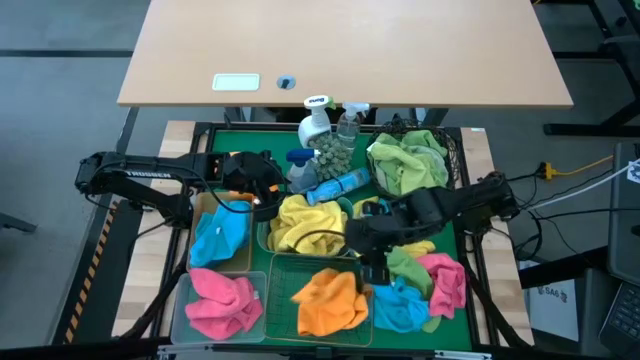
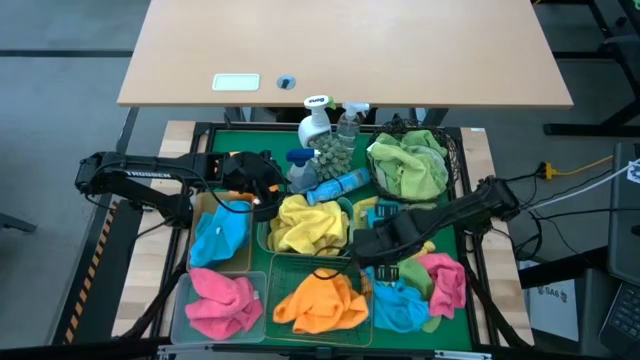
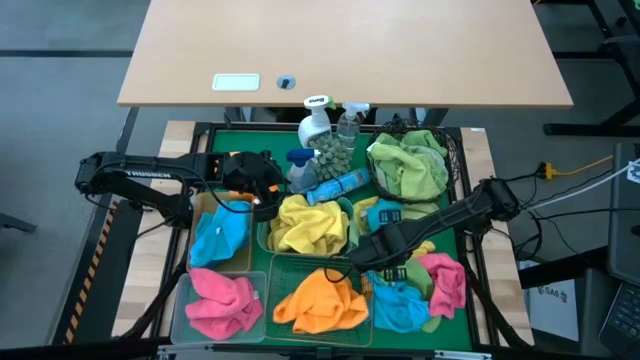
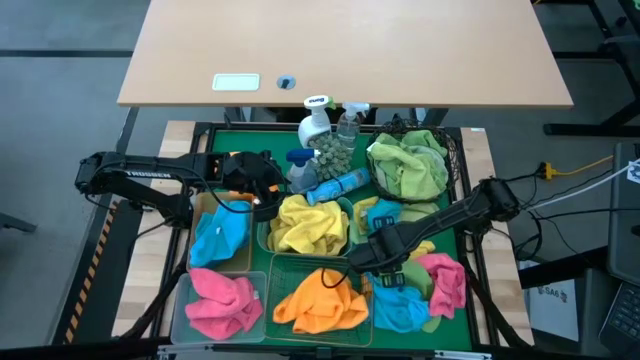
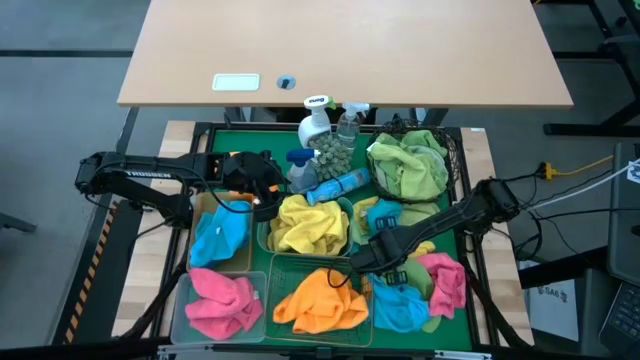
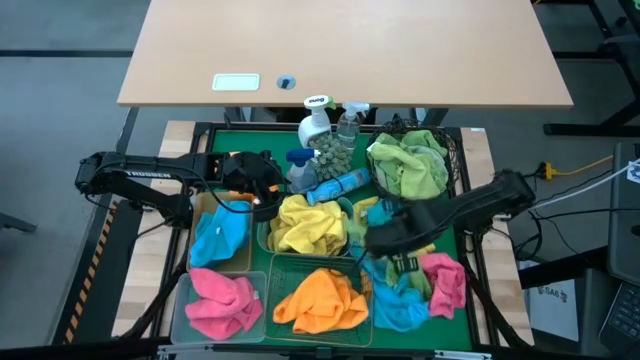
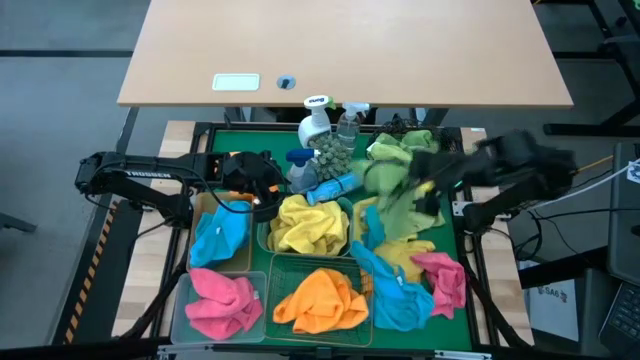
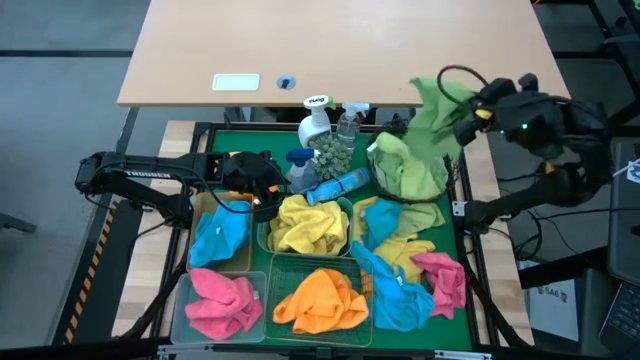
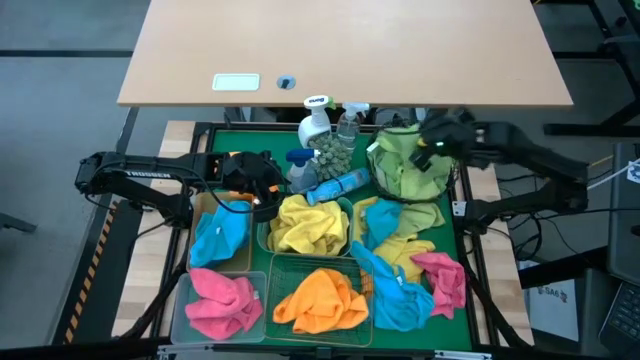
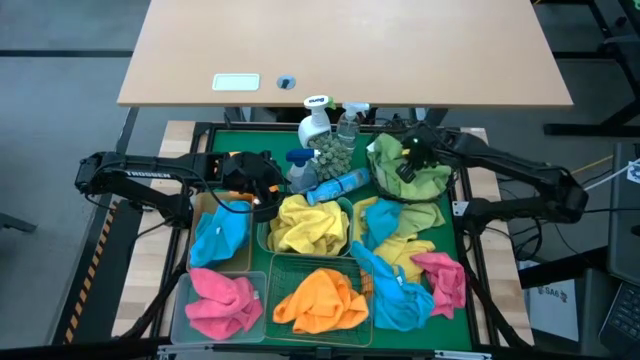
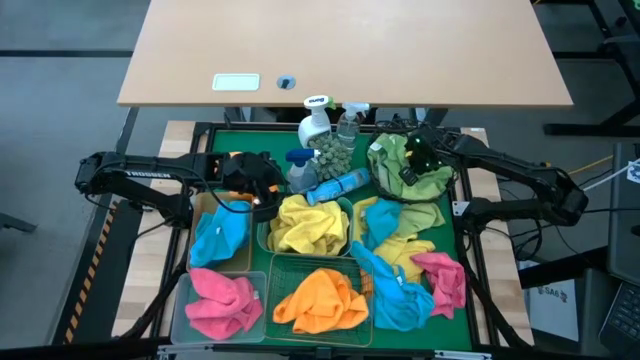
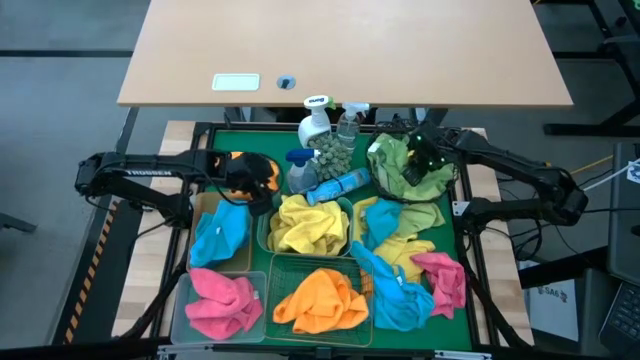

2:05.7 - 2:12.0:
Task: Sort microfiber towel by color & place in baskets
Put the green microfiber towel into the black wire basket

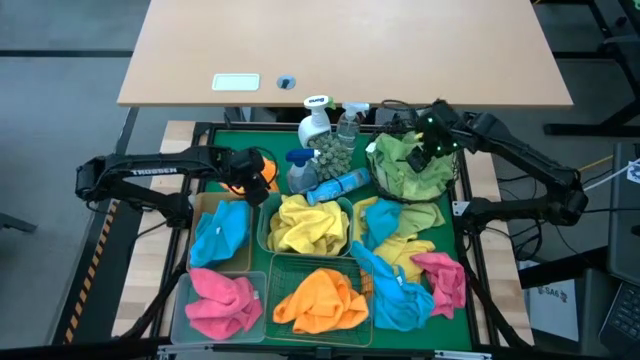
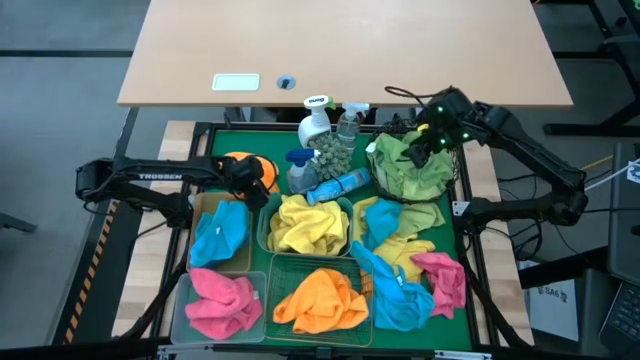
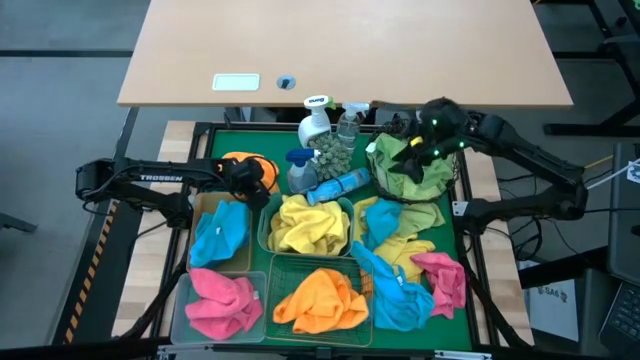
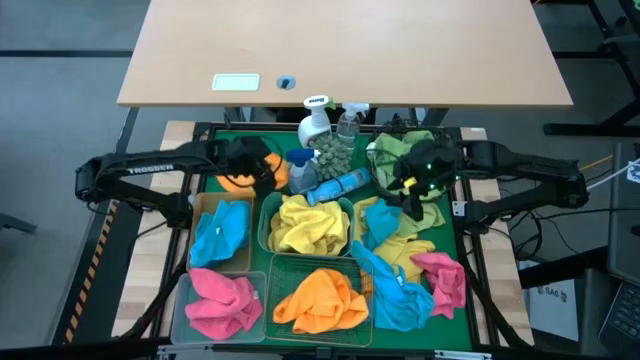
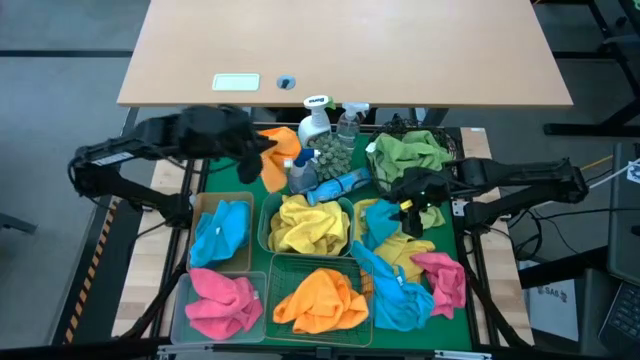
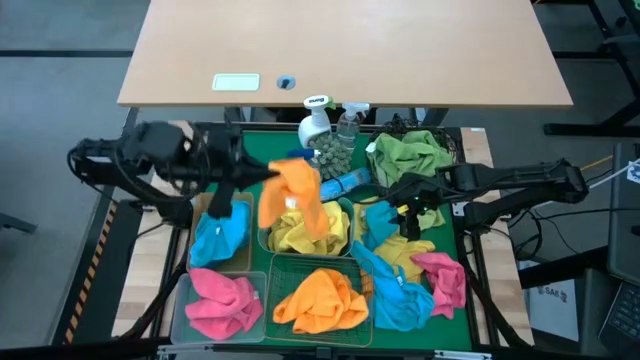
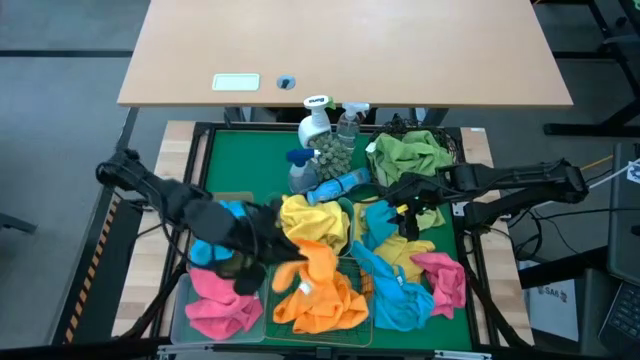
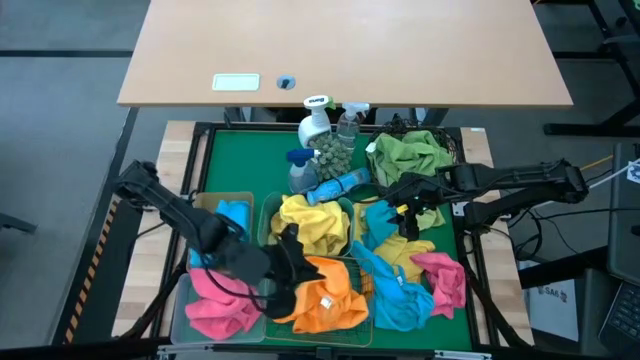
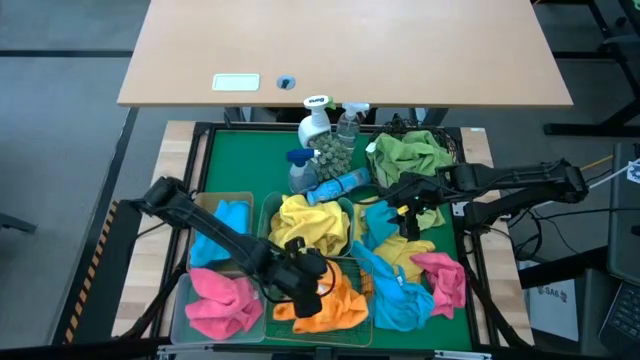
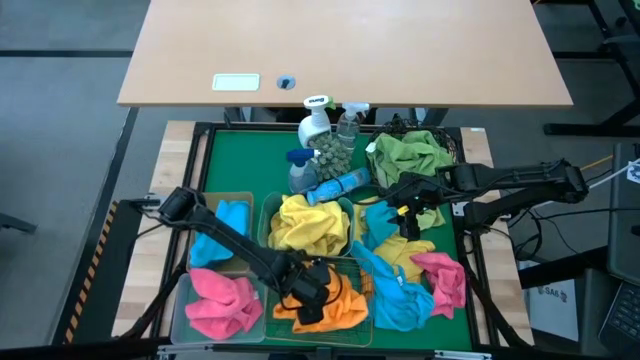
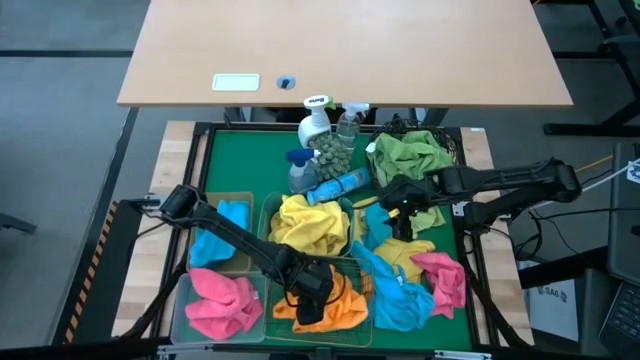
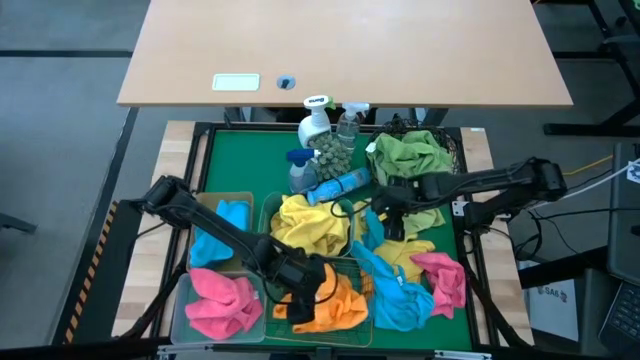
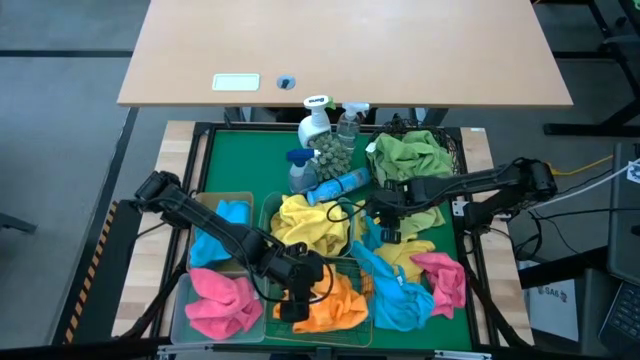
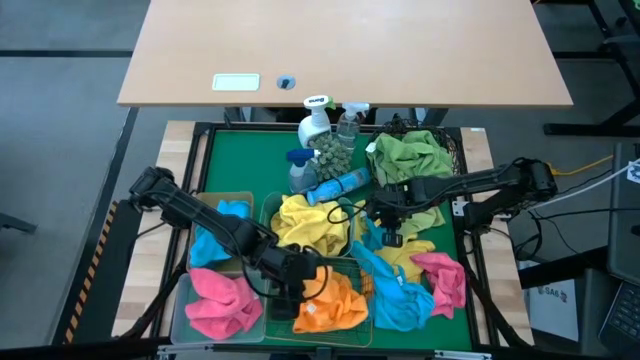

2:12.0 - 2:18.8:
Put the orange microfiber towel into the gold wire basket

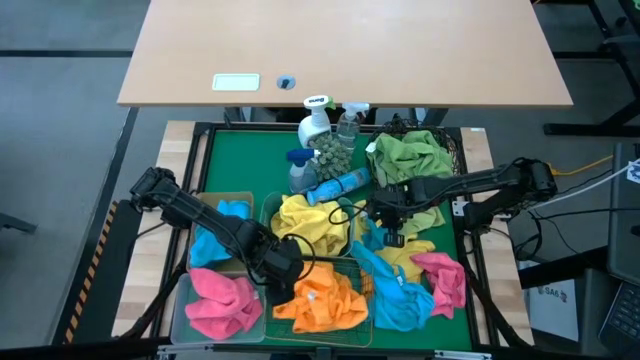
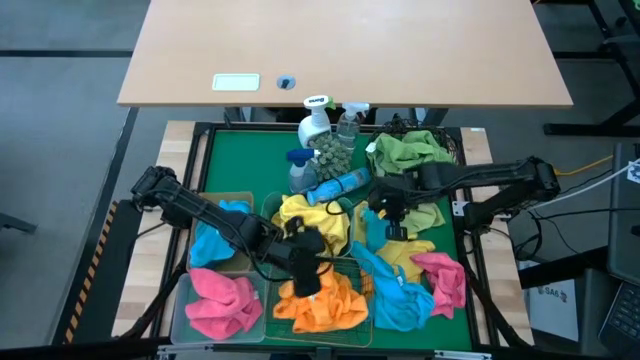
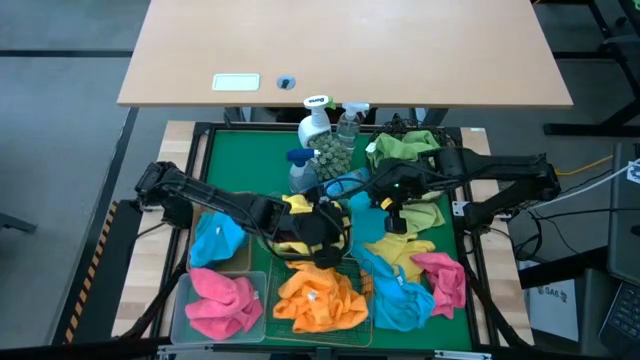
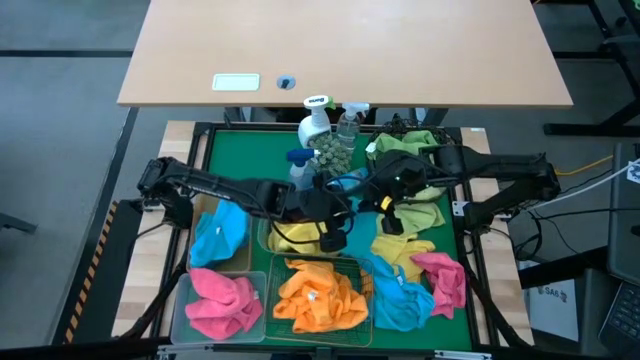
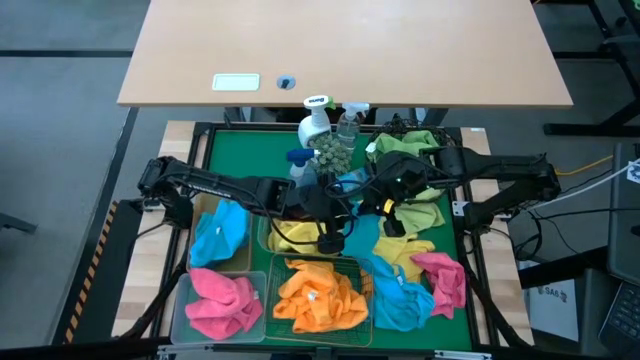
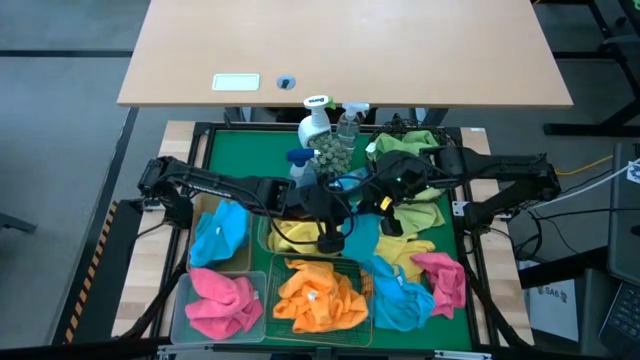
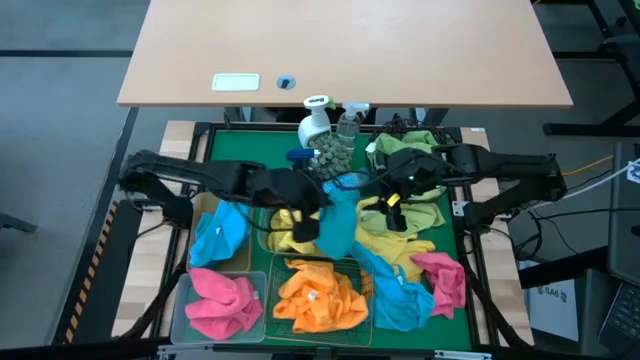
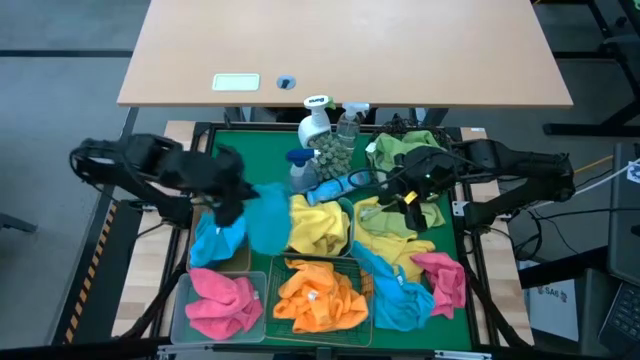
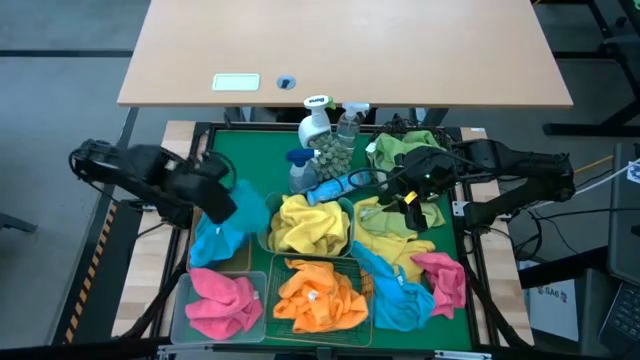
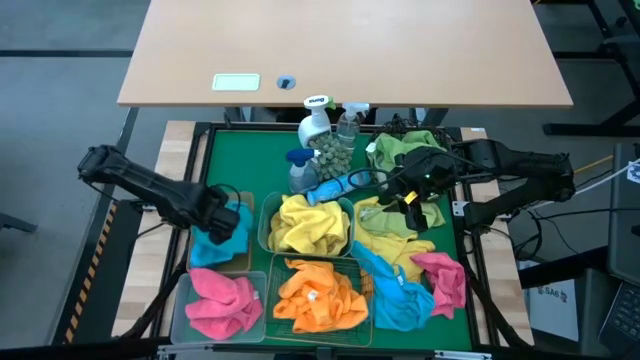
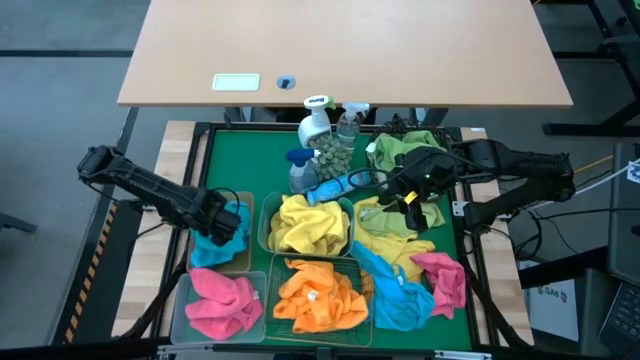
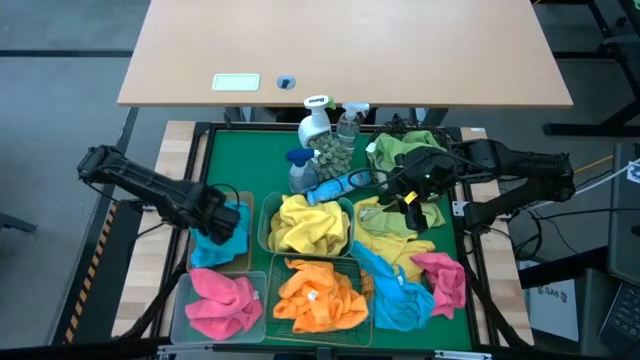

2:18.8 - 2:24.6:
Put the blue microfiber towel into the orange bin

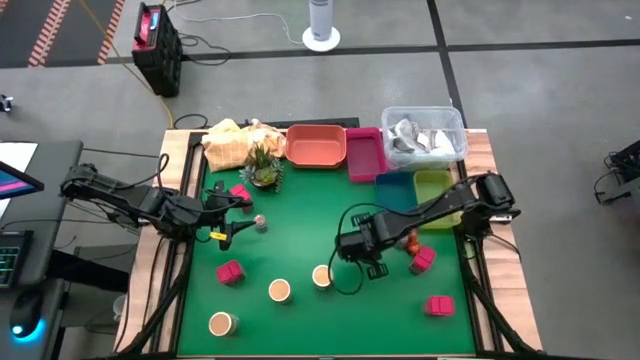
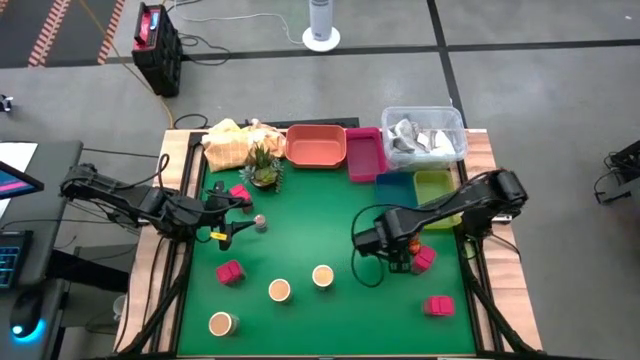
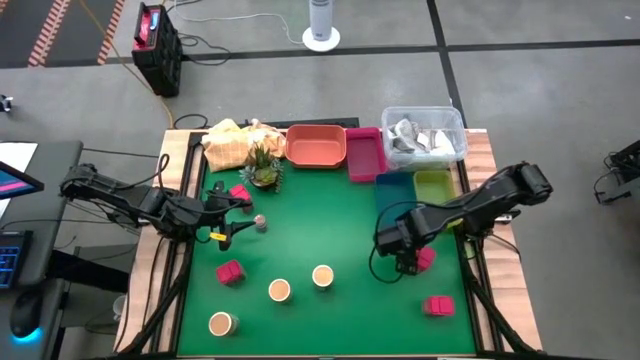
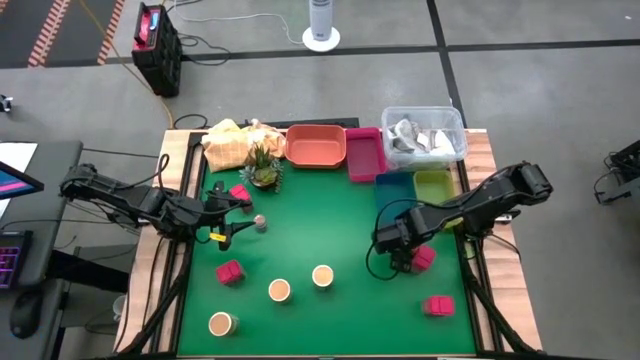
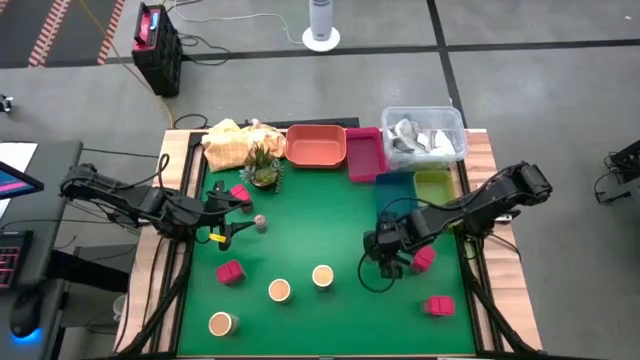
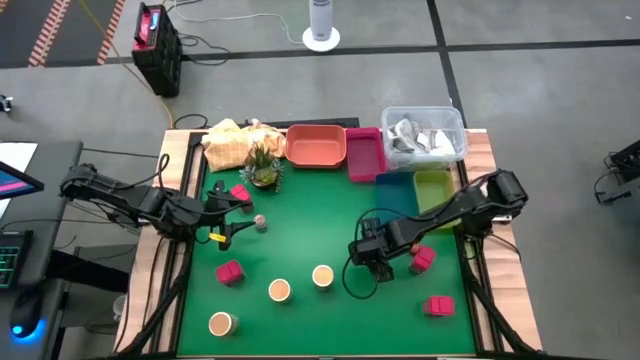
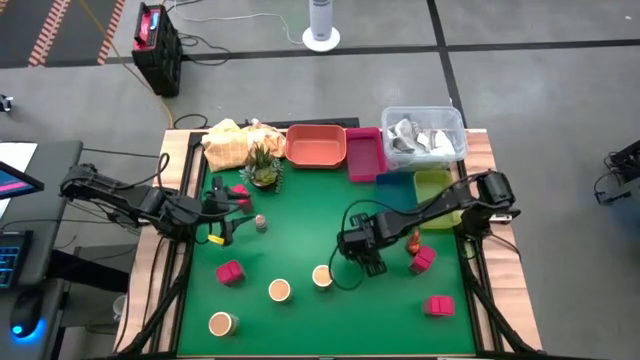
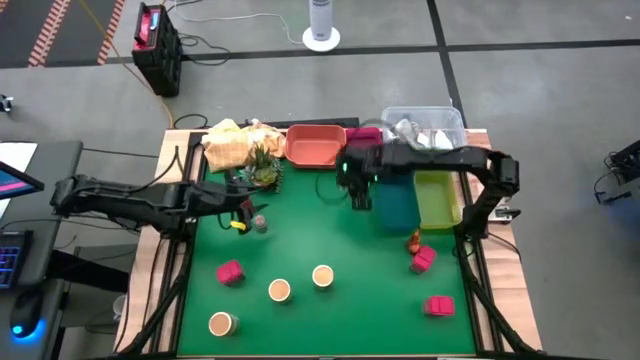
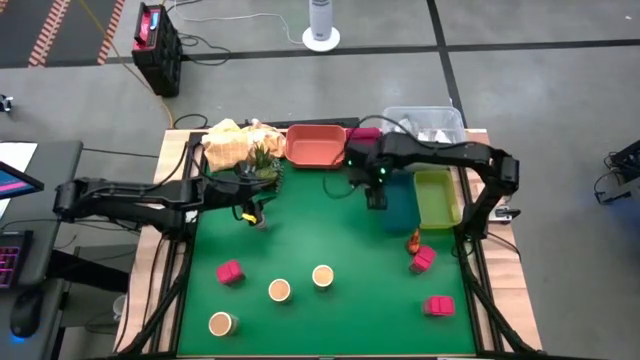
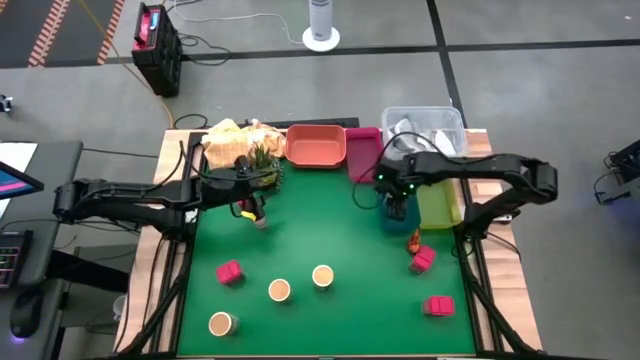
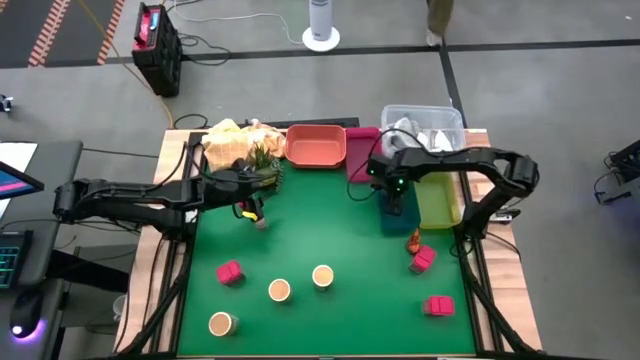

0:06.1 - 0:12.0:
Task: Sort spices by type
Put the brown seasoning bottle into the blue bin
